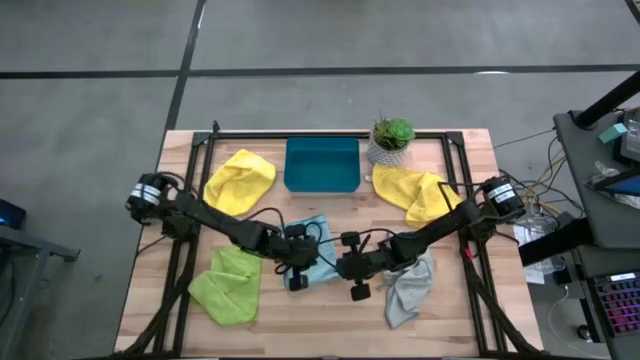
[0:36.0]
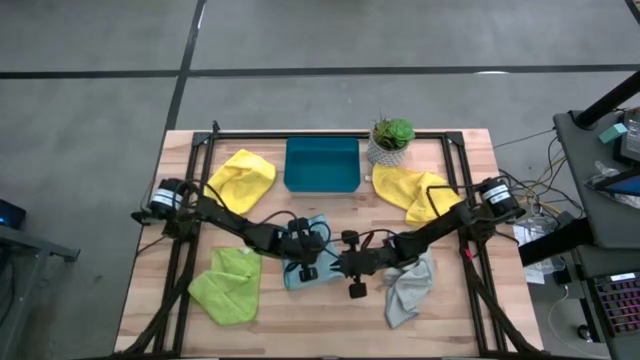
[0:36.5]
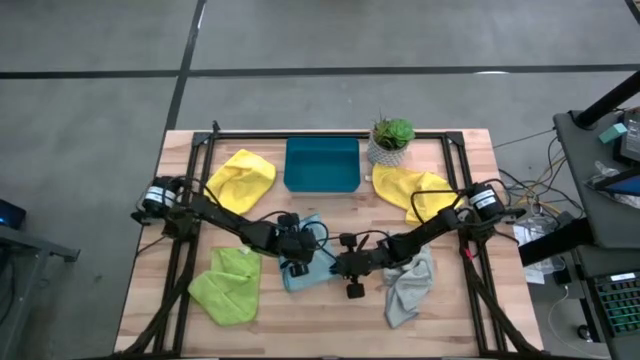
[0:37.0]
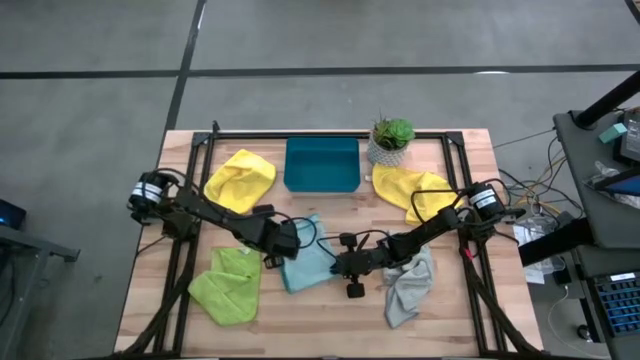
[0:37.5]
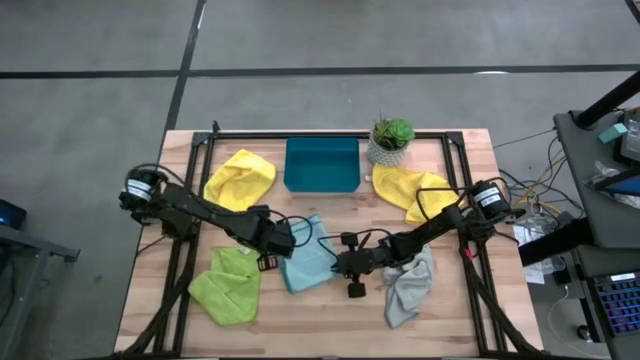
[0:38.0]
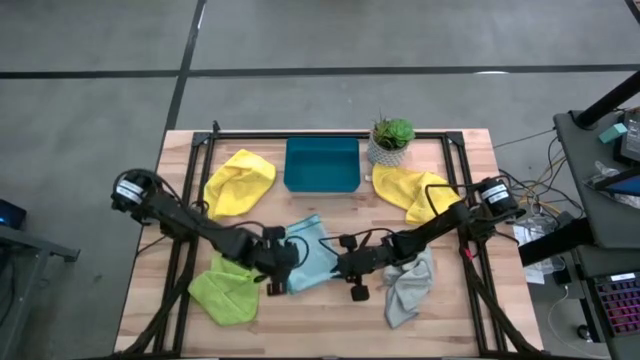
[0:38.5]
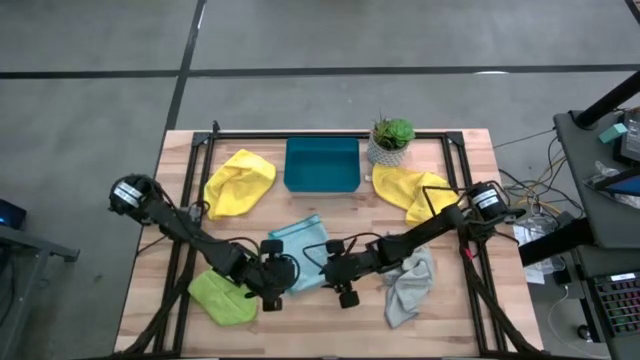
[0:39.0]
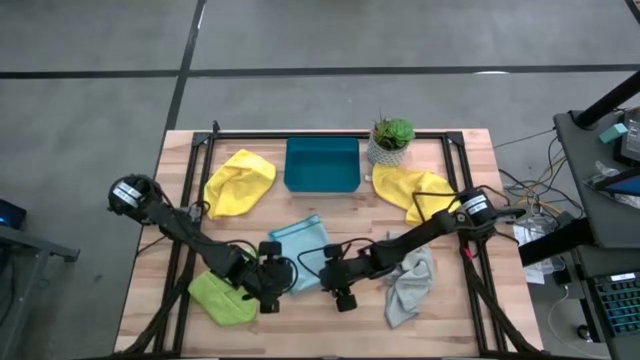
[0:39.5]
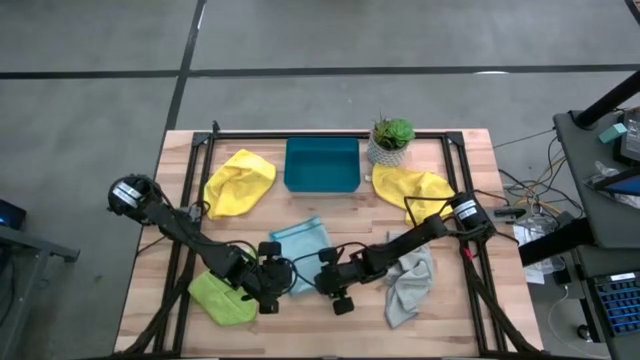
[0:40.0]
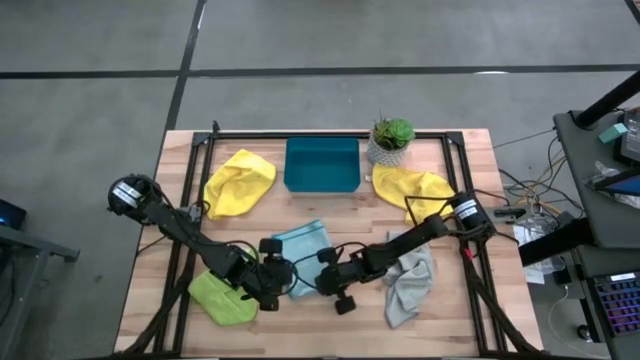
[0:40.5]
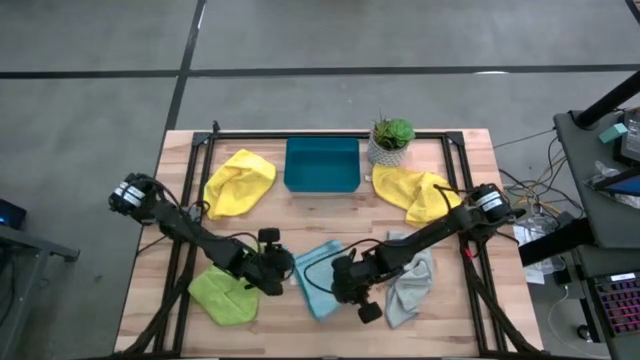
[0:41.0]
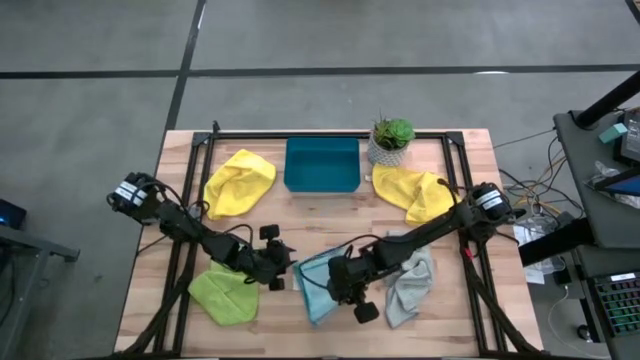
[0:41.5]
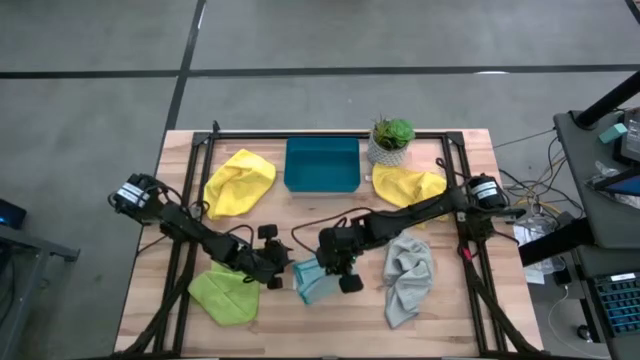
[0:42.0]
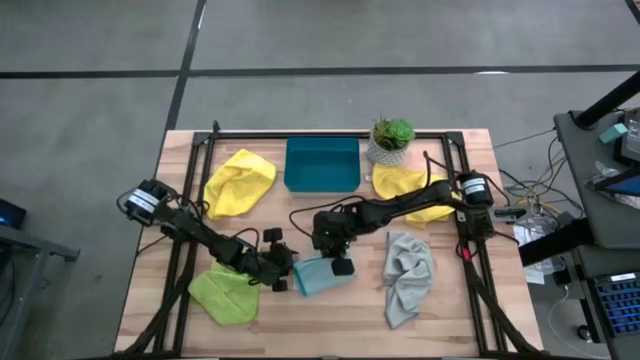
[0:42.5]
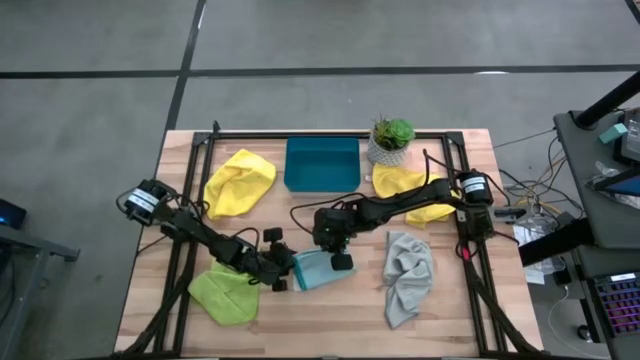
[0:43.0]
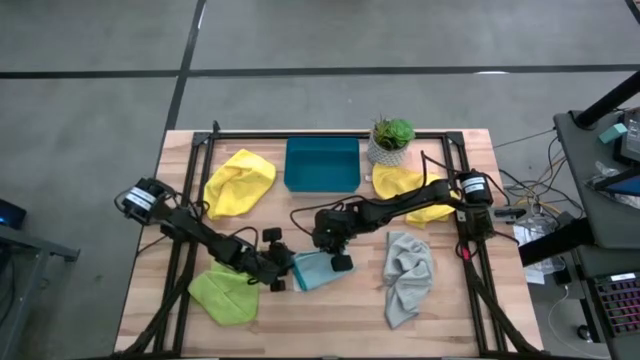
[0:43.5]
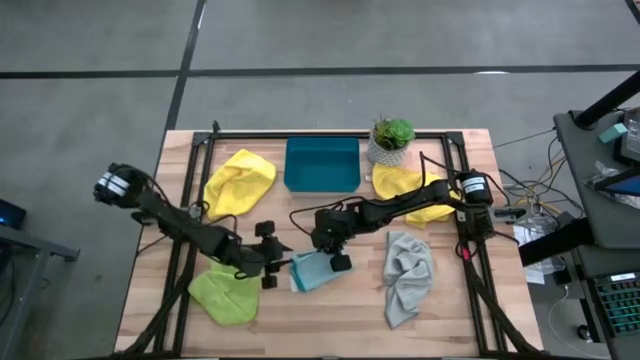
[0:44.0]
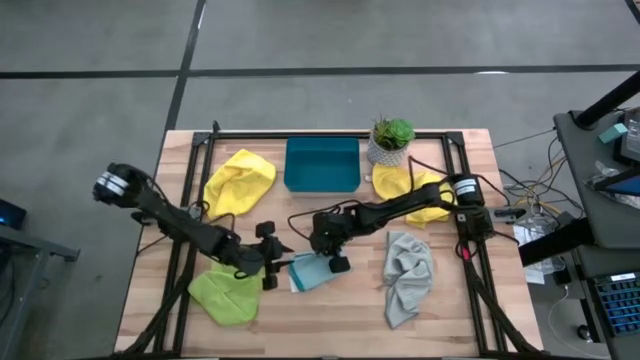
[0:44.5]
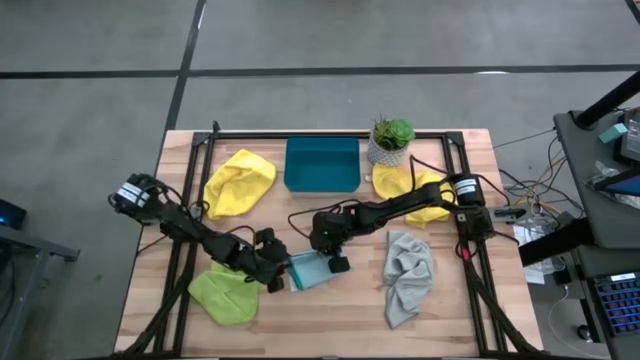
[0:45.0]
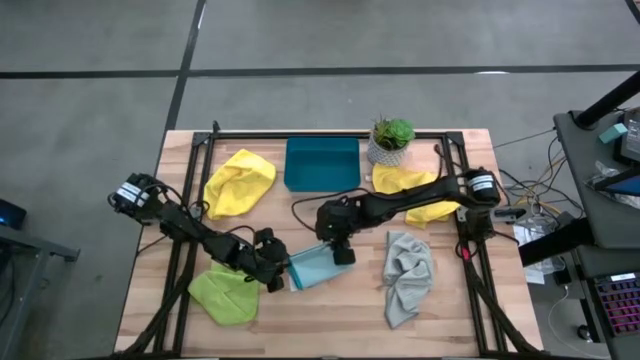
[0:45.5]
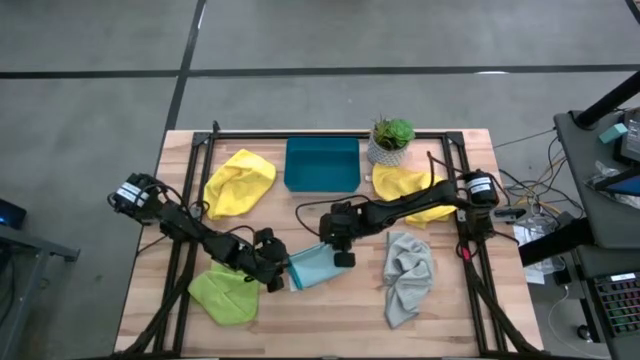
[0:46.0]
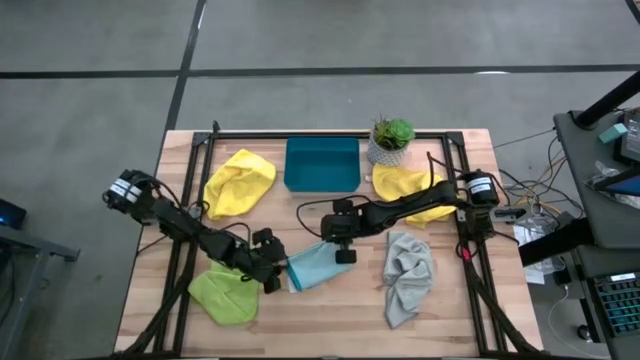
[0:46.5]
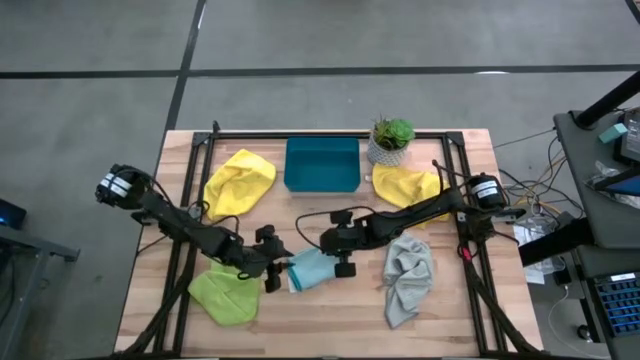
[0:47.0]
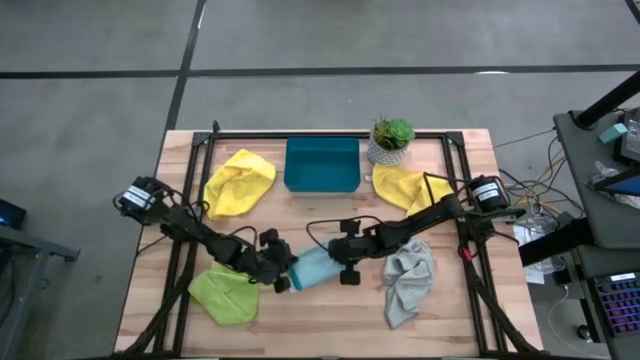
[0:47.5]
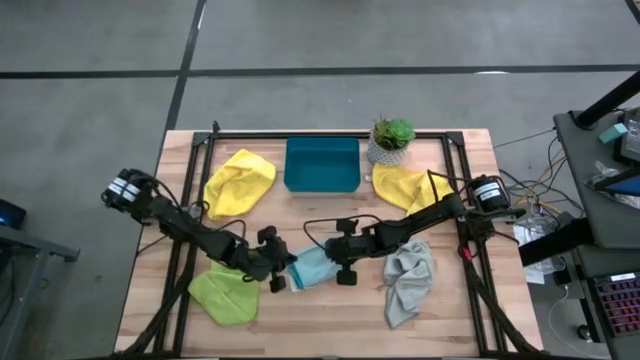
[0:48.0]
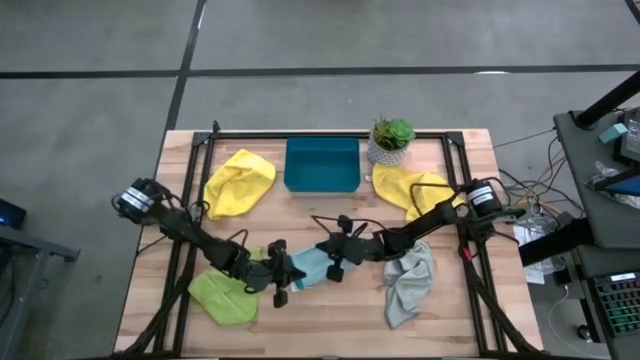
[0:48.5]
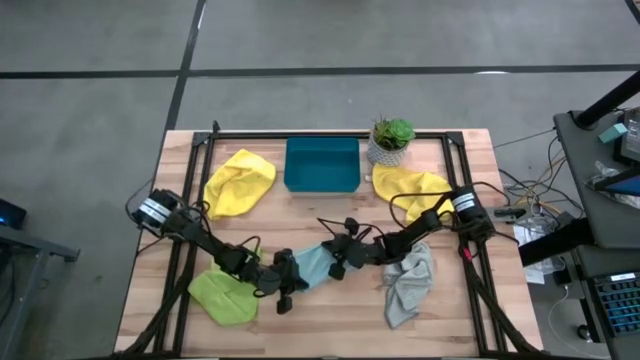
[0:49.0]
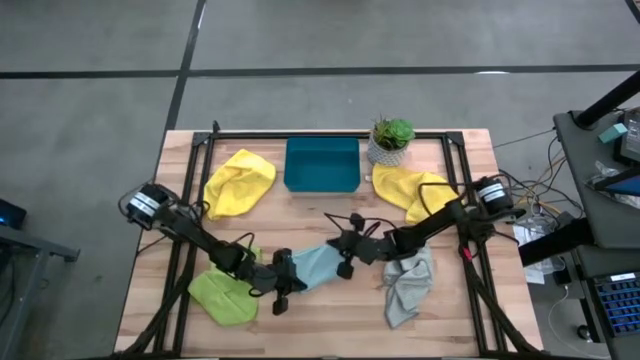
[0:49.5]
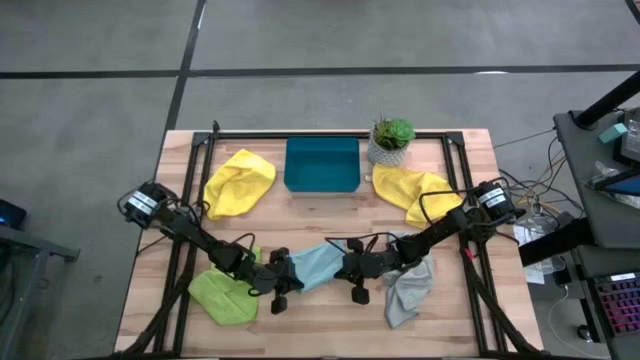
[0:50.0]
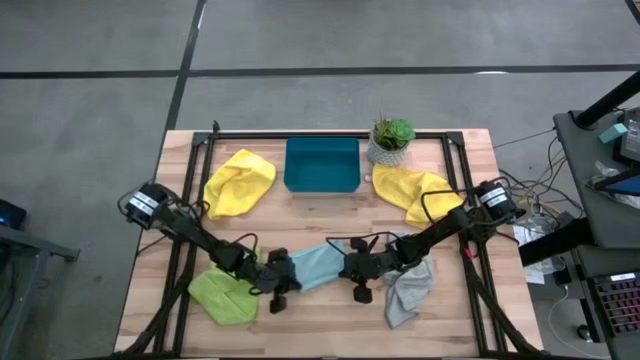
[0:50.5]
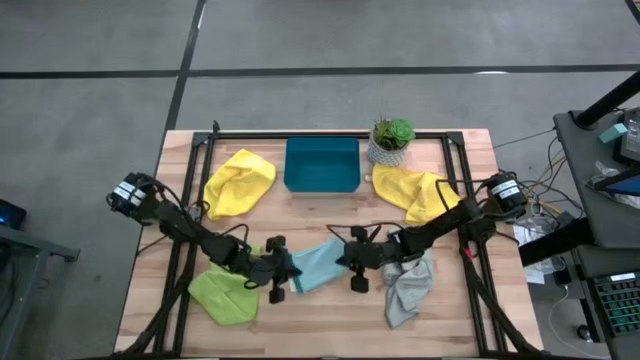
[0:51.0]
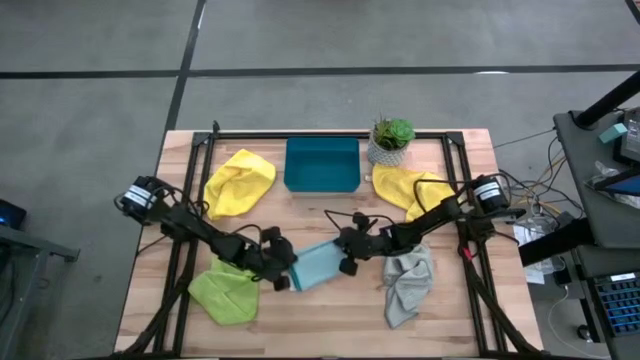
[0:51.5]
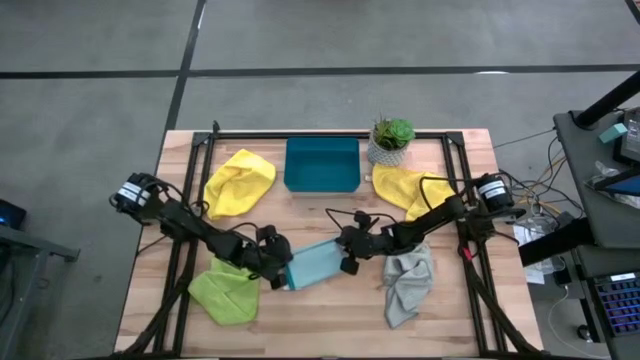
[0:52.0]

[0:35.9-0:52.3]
Task: Fold microfiber towels
Fold the blue microfiber cloth

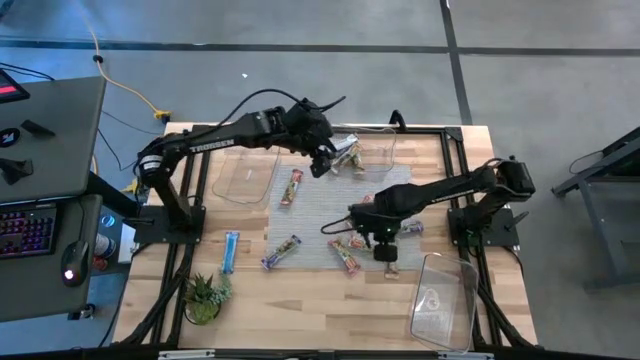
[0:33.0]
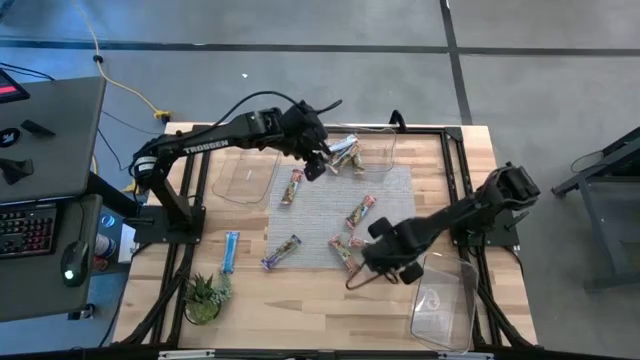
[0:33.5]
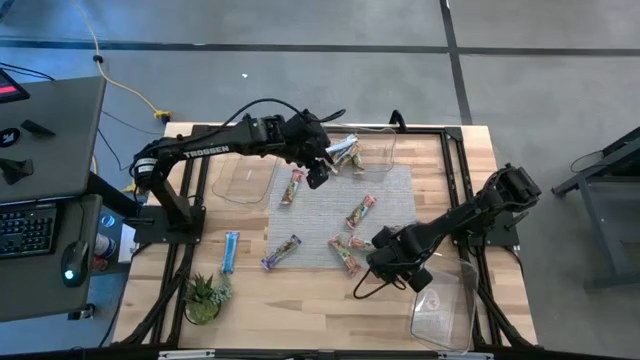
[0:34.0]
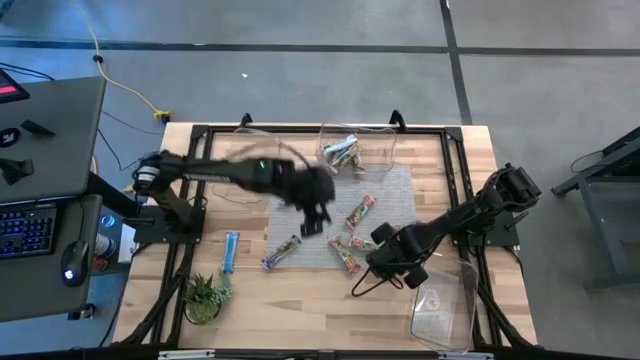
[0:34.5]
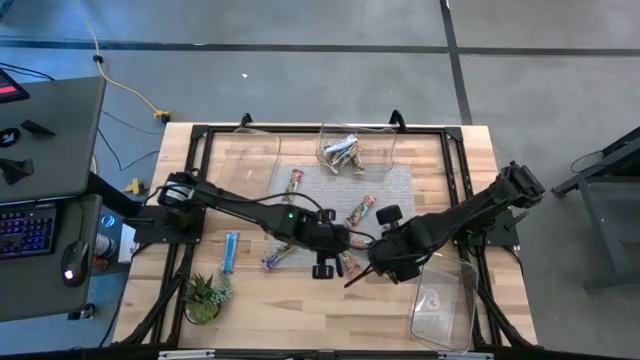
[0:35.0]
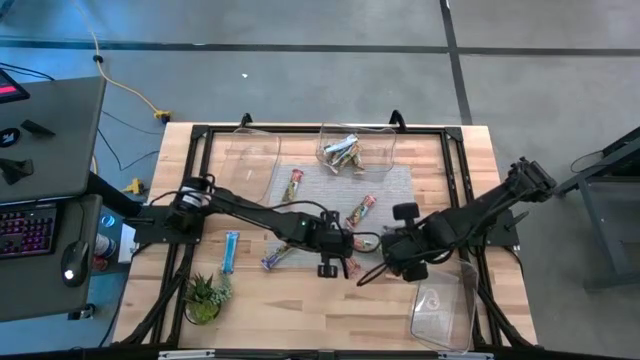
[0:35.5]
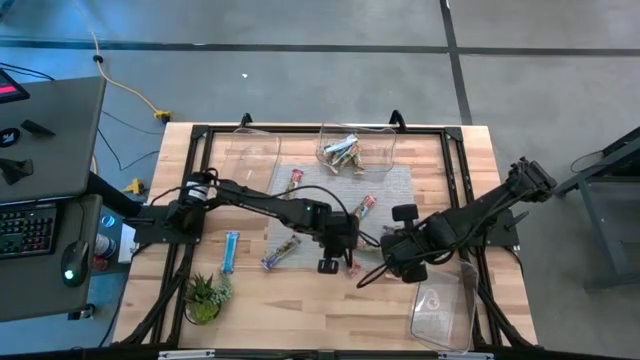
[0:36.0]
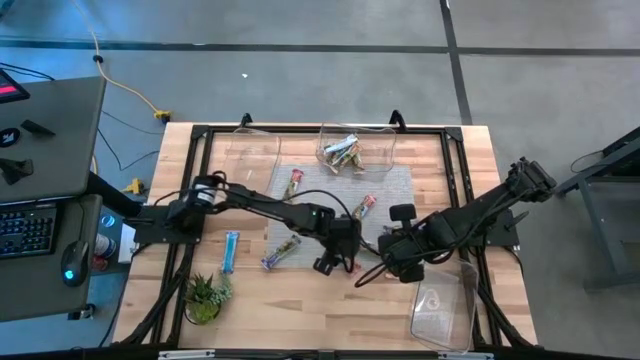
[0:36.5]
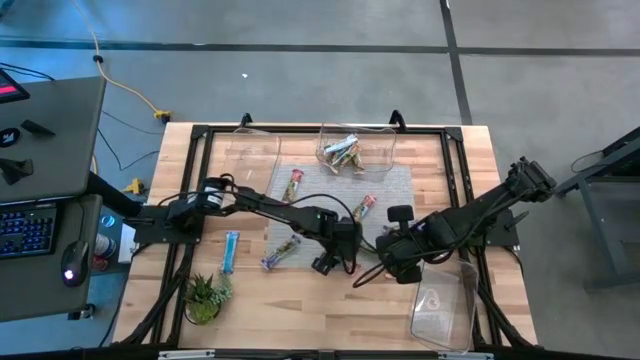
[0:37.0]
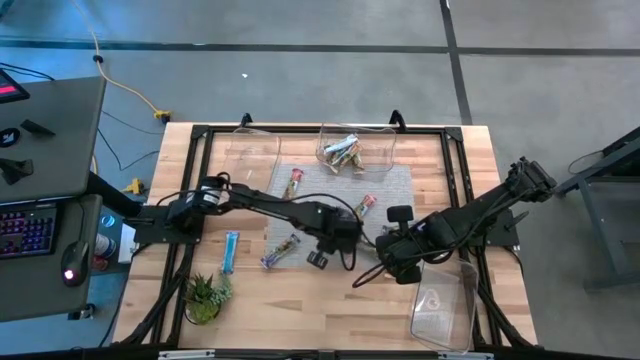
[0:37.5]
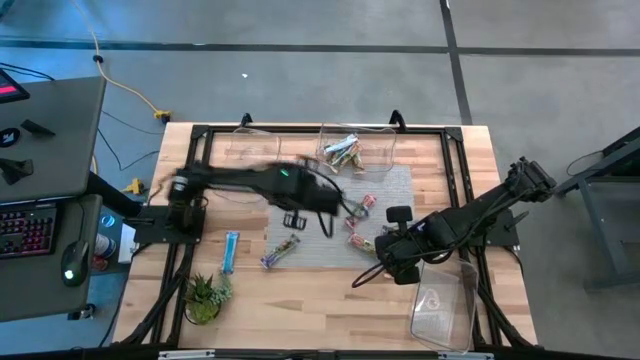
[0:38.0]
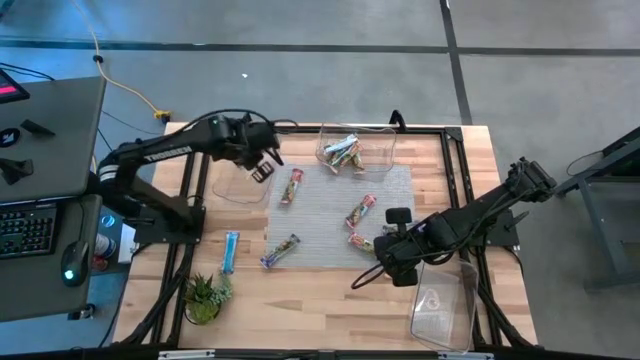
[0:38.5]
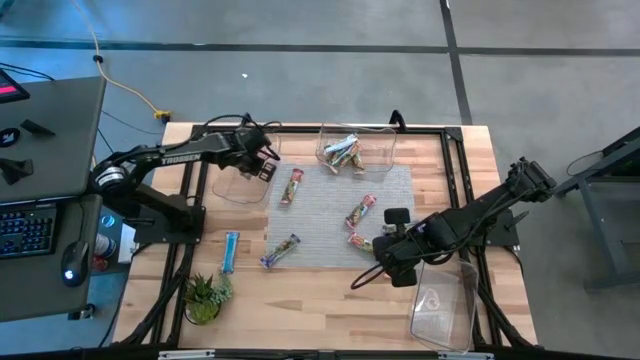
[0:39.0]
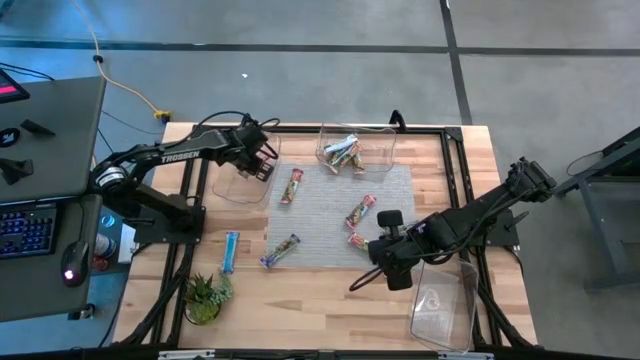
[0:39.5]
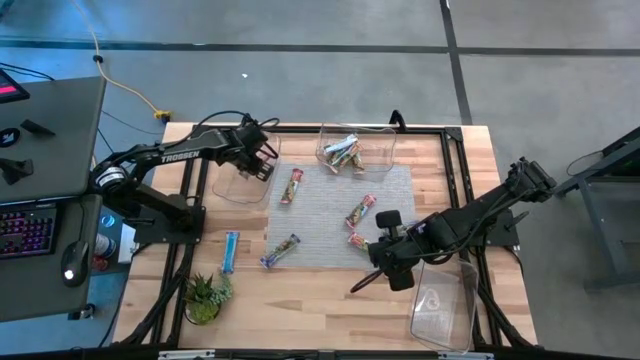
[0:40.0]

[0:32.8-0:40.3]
Task: Pick and place Granola Bars by type
Put the red granola bar into the top left transparent bin
